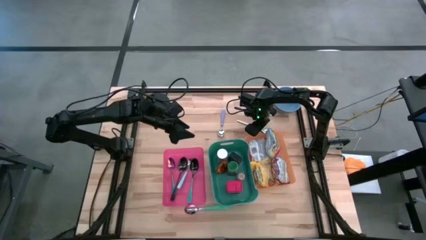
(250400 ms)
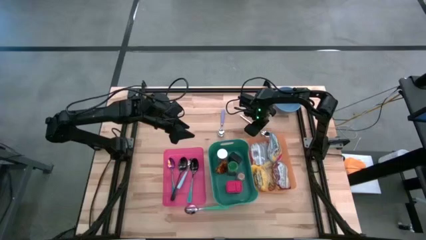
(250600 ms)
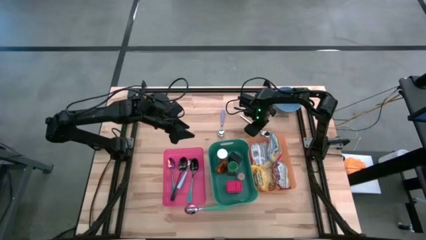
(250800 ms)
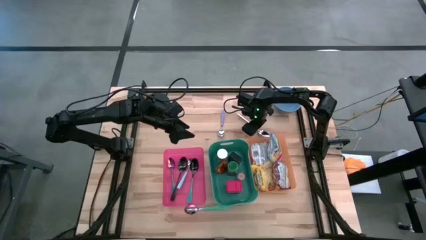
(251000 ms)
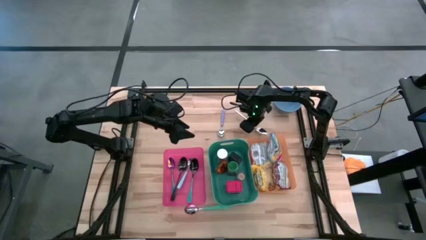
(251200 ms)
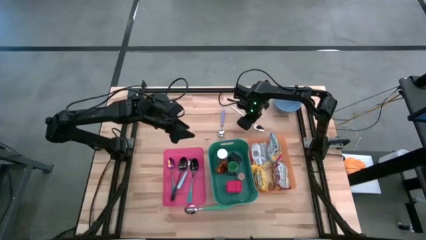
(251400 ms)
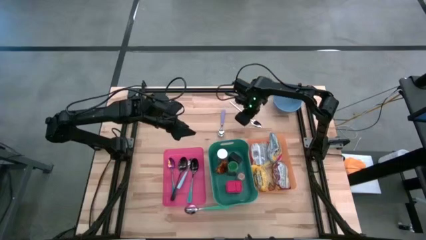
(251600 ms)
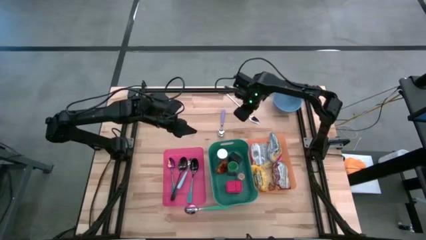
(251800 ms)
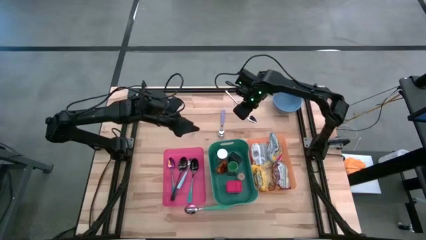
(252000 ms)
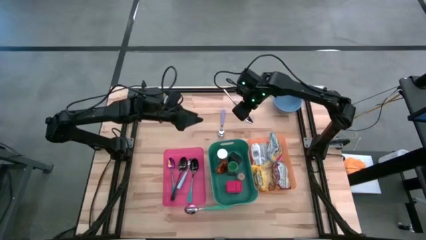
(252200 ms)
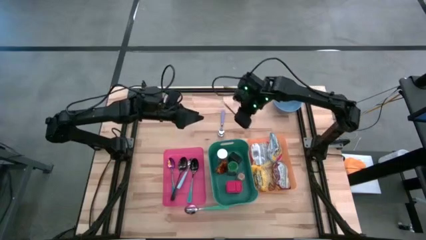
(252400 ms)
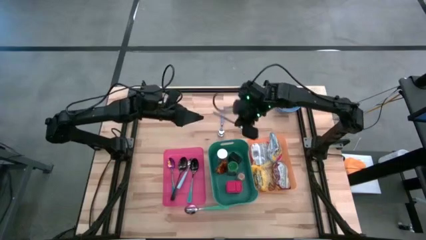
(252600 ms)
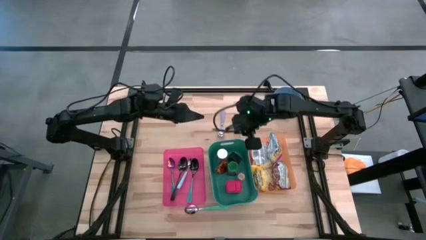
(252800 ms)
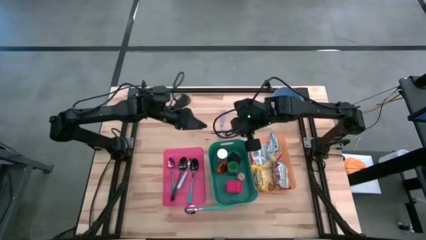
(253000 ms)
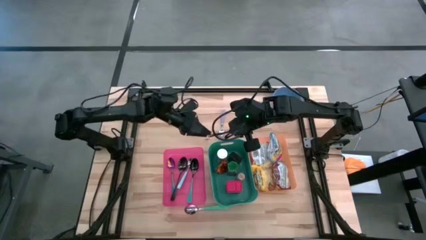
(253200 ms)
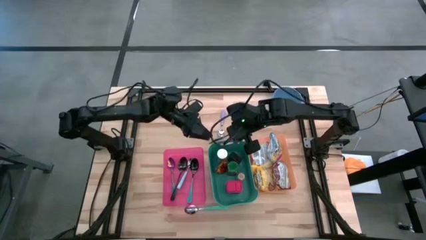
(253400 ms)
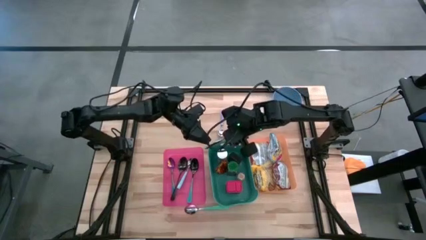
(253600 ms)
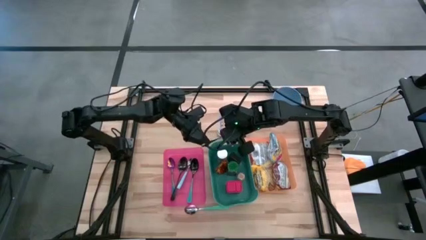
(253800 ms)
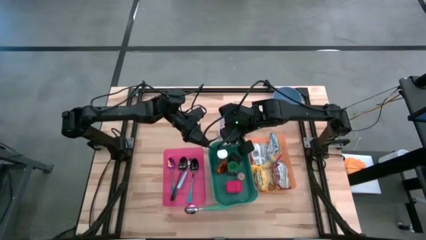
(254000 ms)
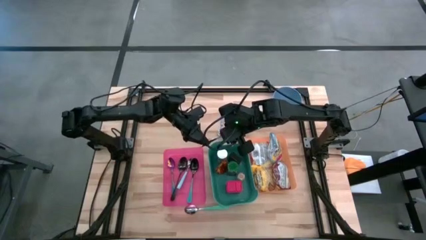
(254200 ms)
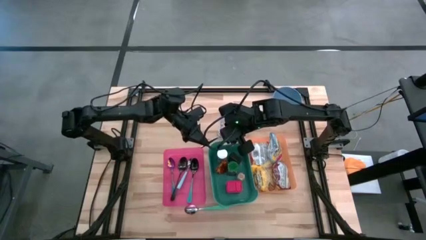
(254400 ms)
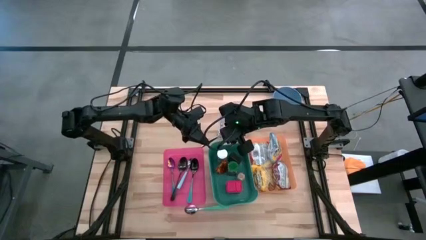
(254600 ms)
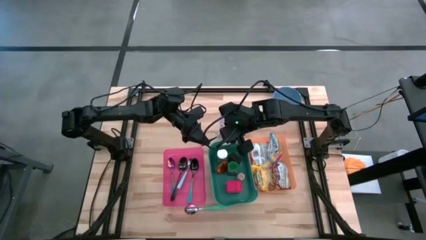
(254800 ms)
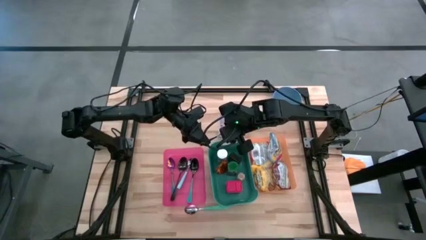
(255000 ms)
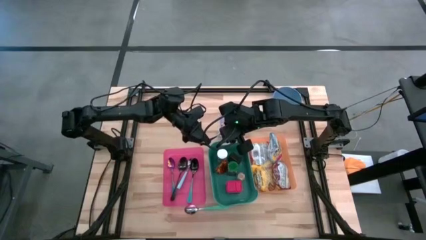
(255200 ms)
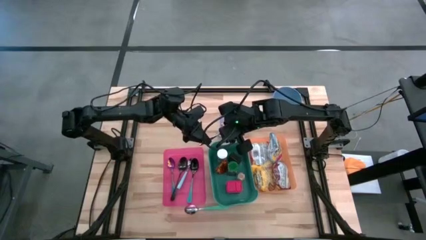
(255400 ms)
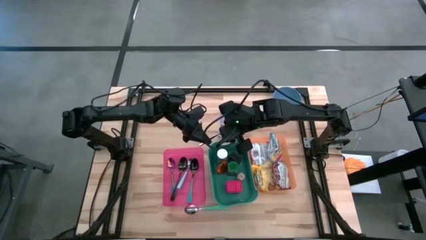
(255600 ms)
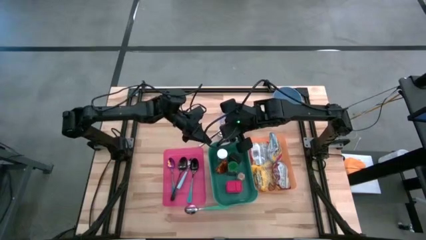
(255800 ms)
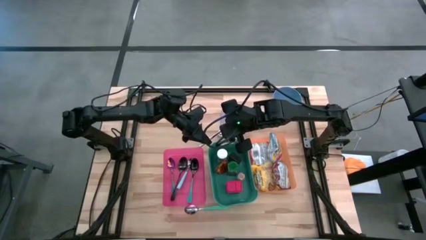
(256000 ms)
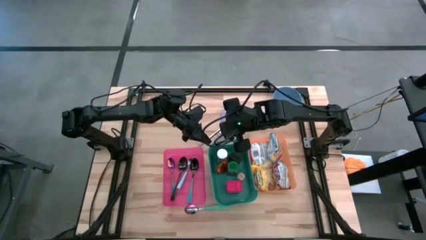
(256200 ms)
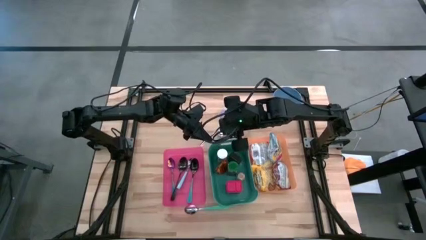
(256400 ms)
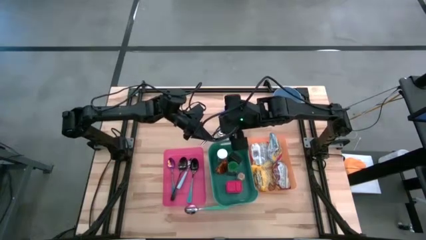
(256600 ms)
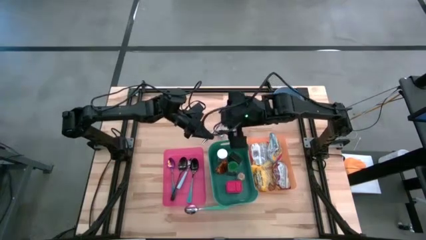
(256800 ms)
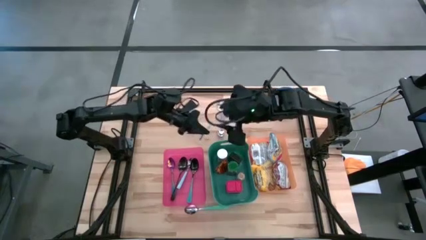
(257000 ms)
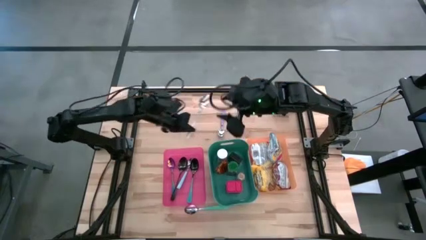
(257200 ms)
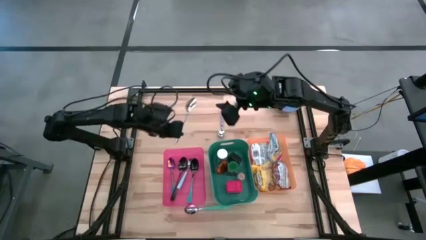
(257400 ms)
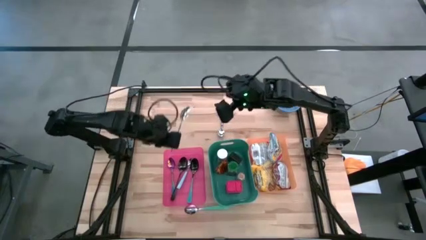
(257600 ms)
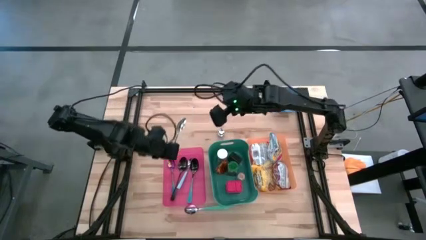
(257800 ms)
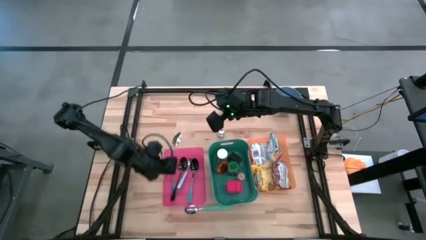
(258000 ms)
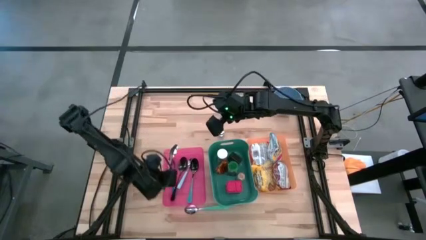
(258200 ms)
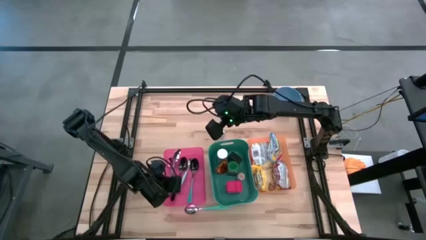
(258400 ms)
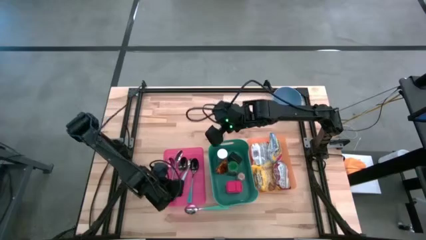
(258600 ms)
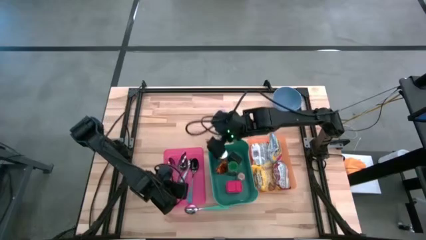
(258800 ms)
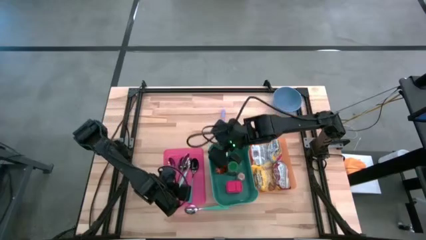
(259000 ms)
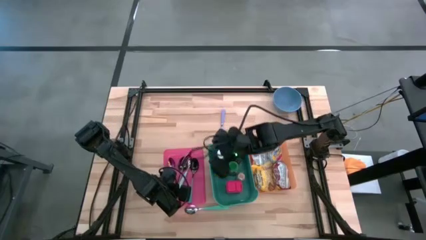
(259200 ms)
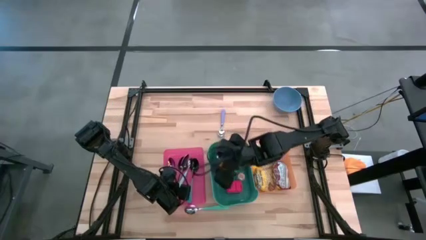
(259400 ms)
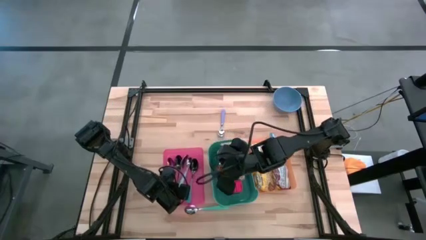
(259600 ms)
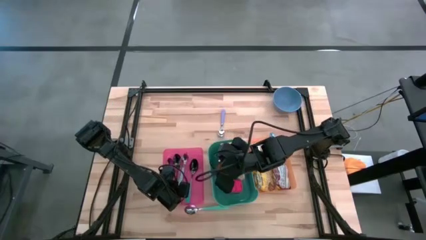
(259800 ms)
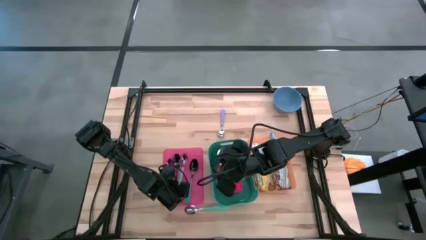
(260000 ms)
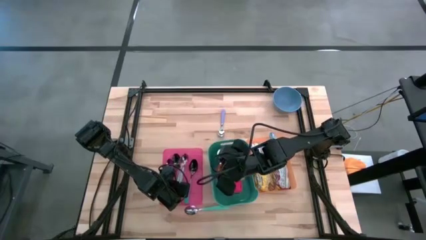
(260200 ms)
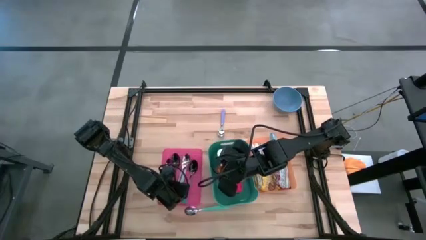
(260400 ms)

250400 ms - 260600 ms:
Put the silver spoon into the pink bin
